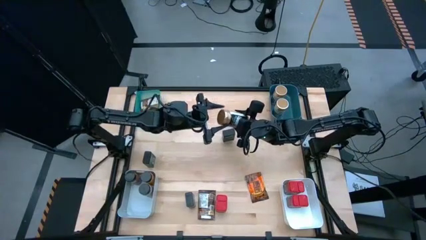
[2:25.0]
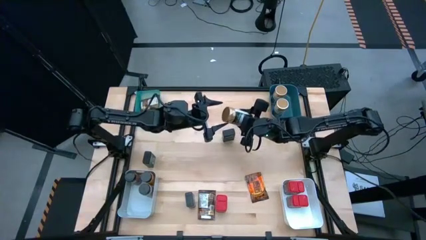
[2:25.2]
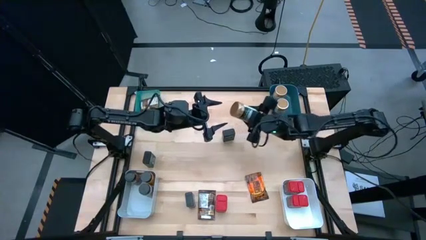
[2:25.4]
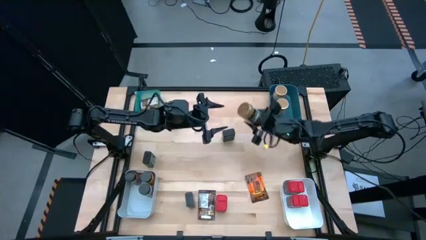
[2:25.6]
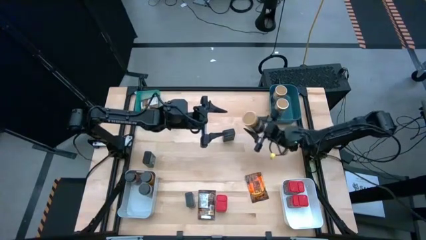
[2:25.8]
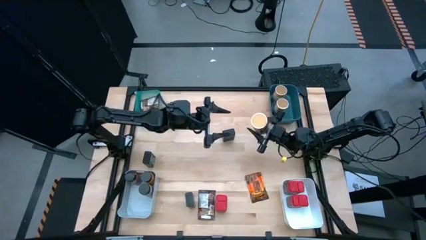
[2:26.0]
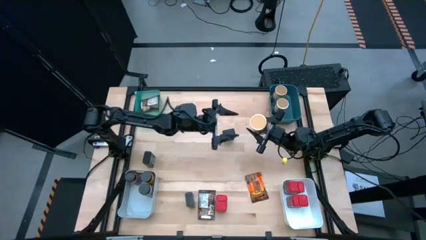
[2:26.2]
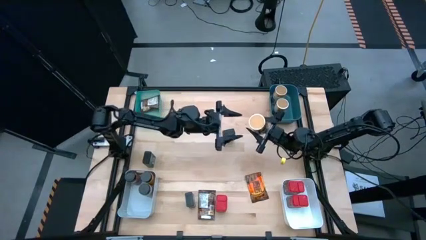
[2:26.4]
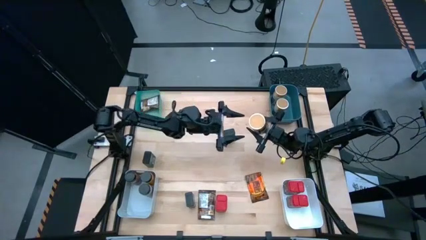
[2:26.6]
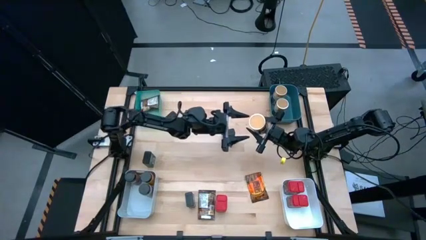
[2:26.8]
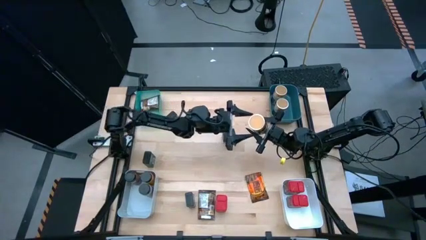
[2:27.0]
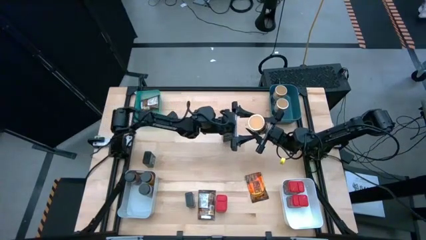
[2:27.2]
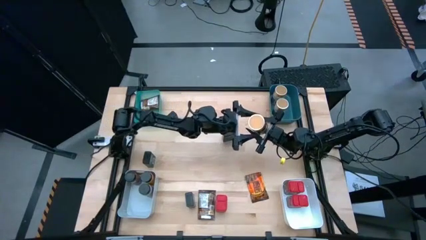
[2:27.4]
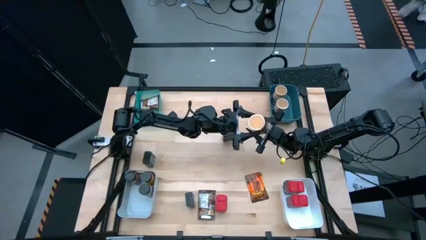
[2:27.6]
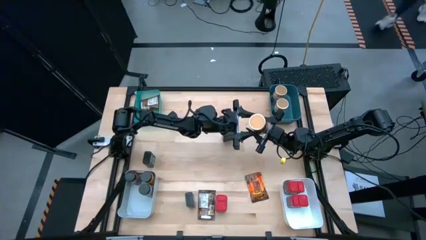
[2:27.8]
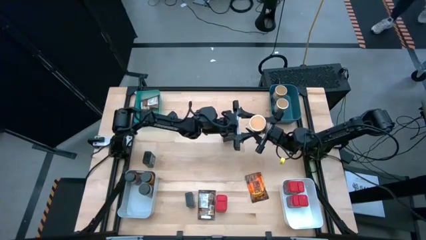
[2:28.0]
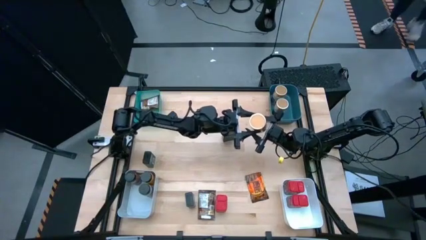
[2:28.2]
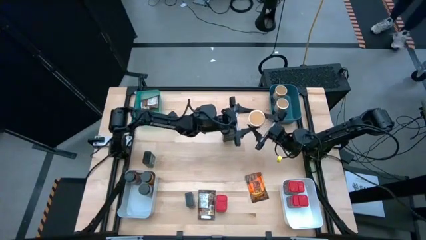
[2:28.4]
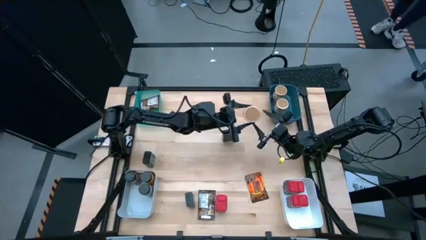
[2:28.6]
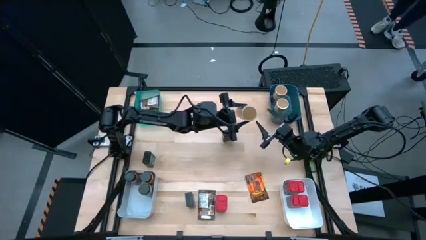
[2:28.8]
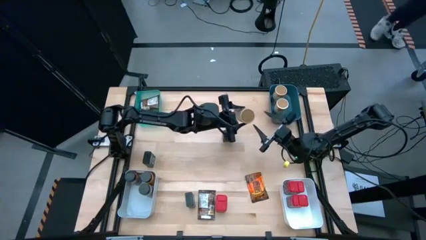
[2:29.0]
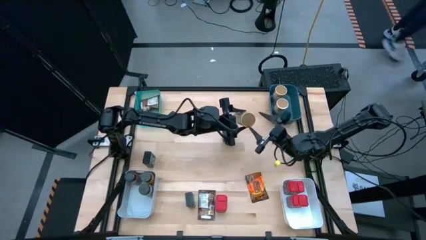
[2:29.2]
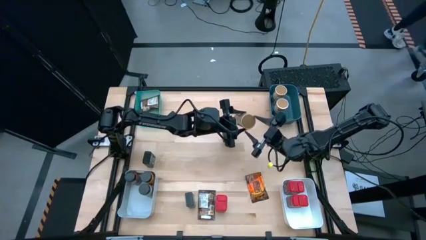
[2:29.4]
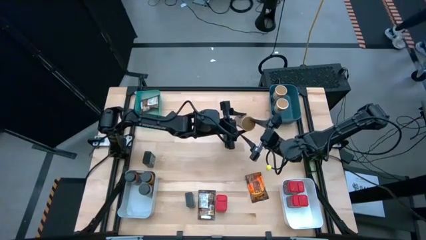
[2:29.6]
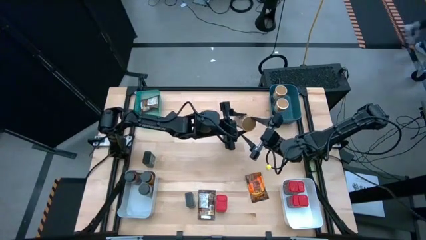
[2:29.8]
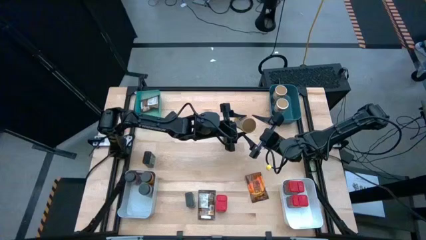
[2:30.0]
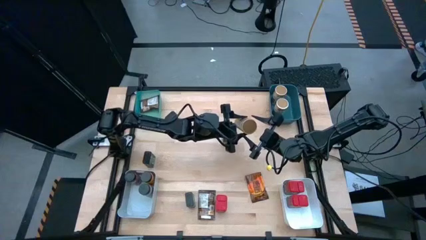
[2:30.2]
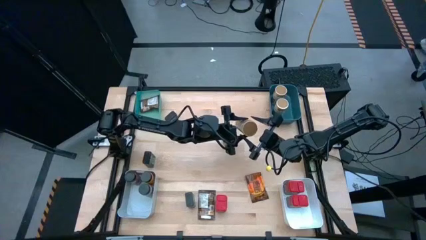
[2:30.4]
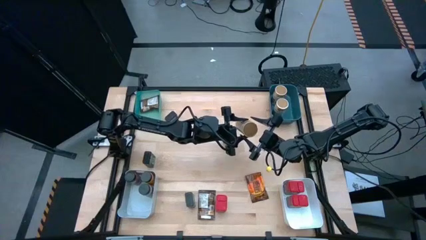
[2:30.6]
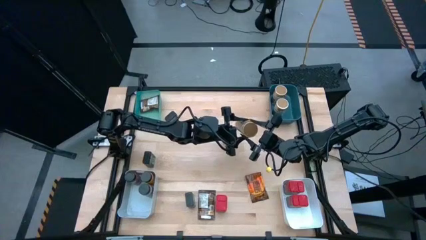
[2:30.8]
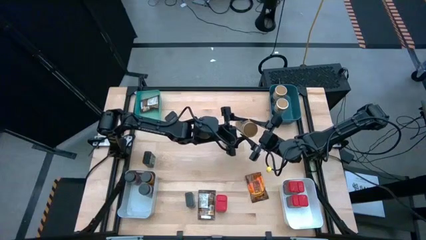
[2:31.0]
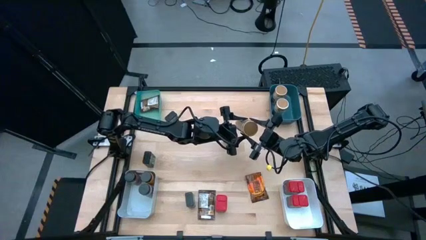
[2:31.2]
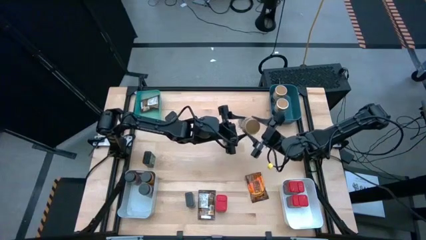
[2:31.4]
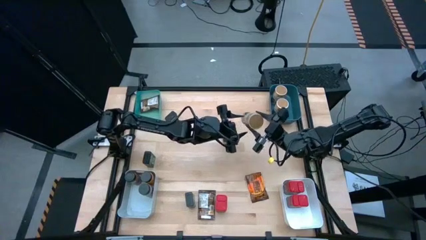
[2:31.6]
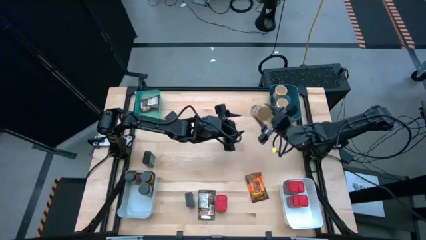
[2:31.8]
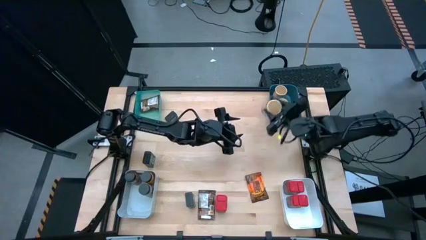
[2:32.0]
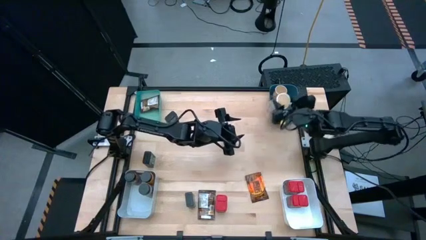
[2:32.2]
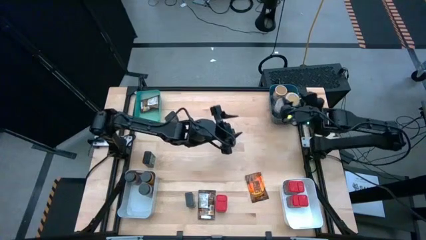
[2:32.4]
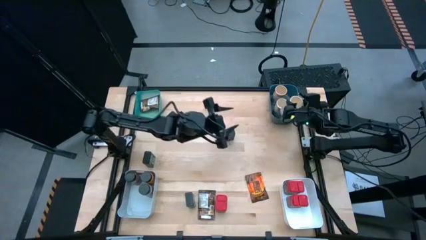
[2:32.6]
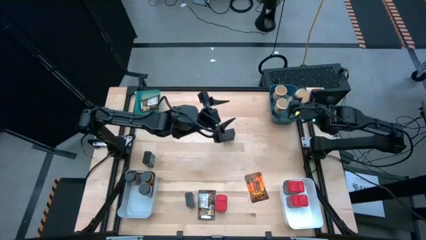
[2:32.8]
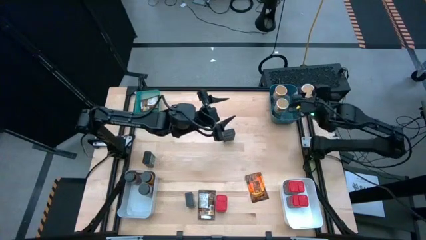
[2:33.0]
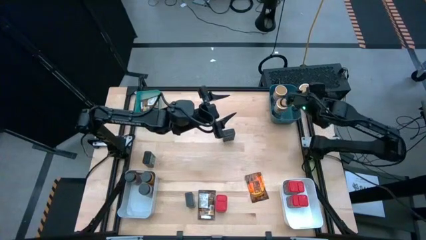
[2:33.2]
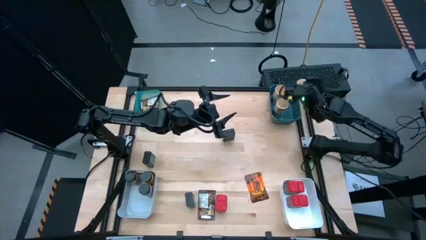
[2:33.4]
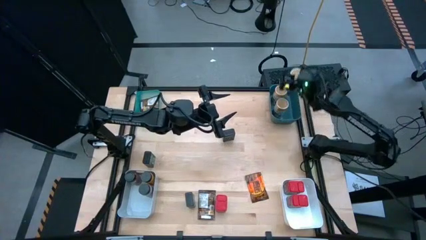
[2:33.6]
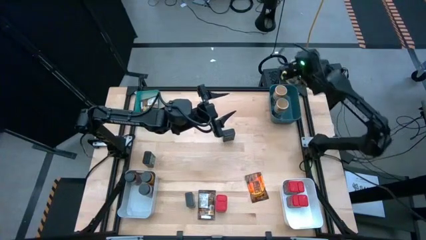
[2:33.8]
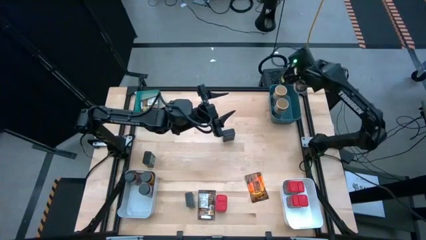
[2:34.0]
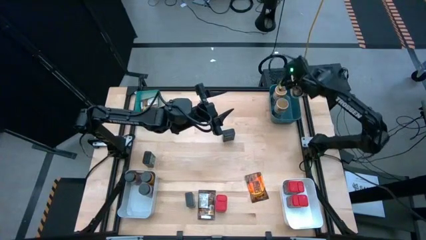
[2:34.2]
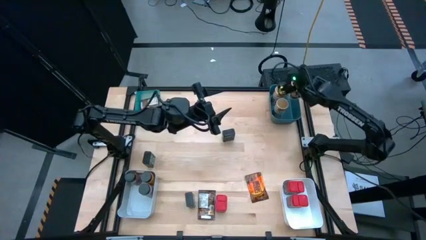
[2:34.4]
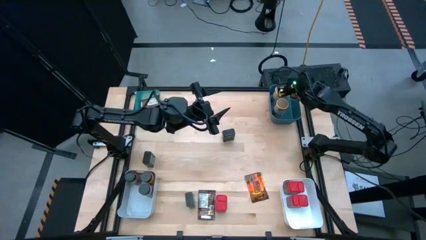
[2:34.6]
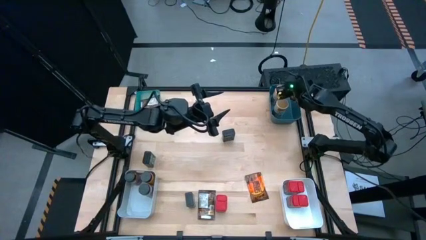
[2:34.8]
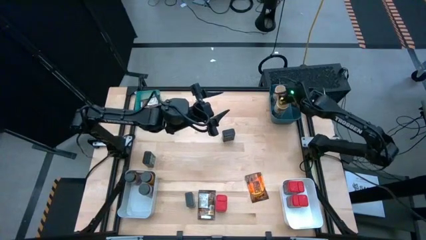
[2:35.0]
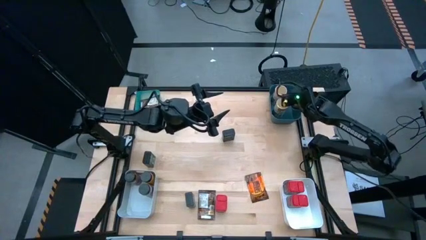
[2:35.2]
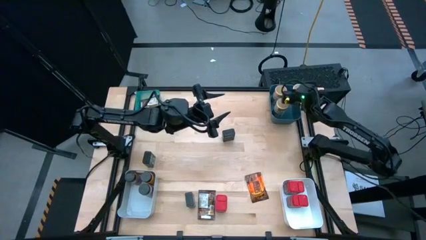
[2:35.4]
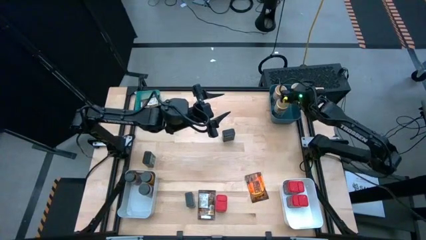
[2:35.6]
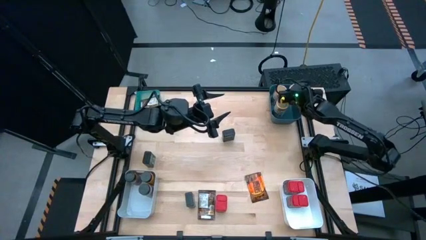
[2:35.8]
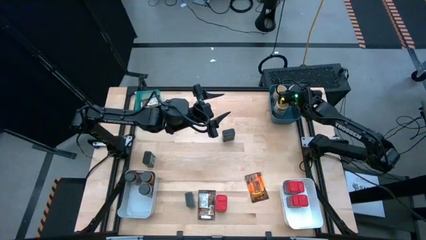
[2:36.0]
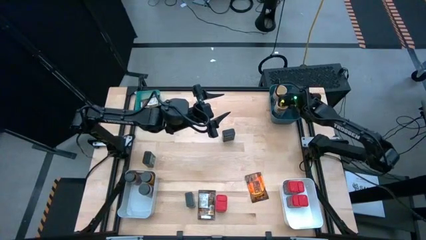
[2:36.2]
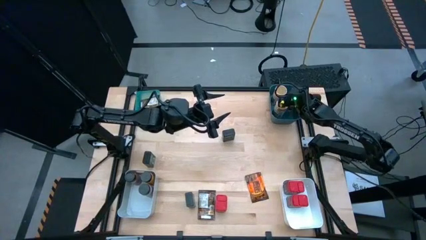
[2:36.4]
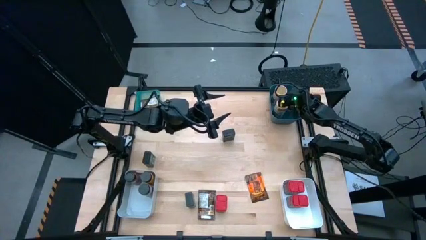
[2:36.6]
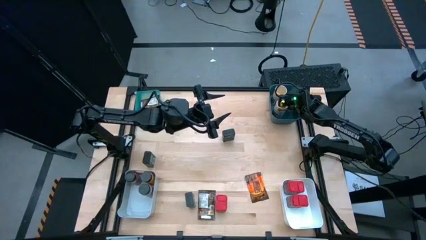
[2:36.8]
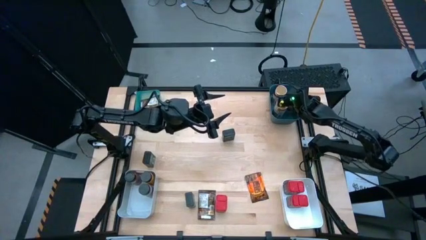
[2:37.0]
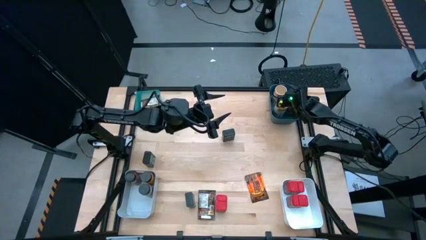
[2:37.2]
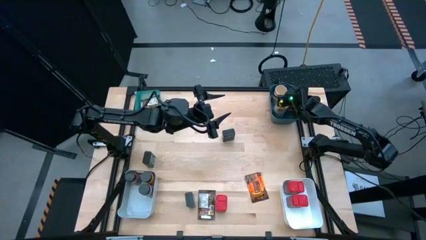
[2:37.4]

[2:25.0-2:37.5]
Task: Sort spices by type
Put the brown seasoning bottle into the dark green bin

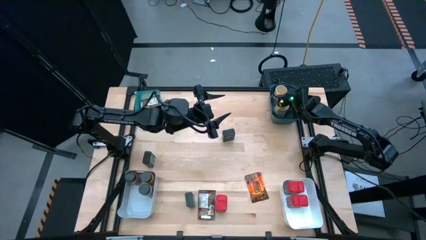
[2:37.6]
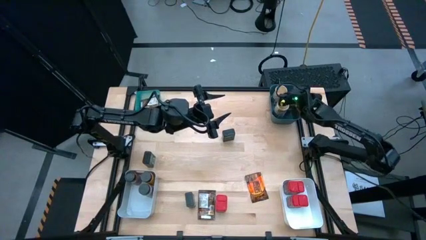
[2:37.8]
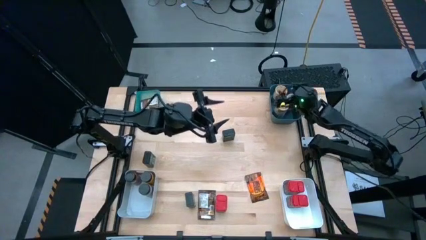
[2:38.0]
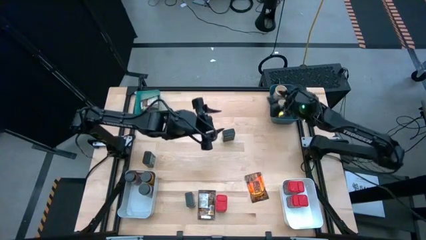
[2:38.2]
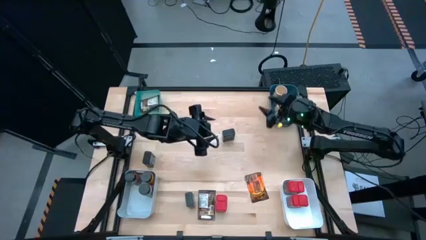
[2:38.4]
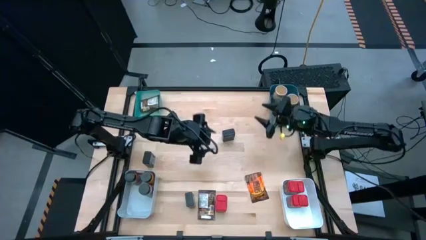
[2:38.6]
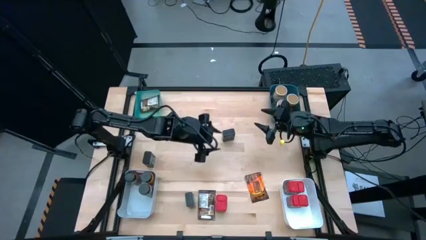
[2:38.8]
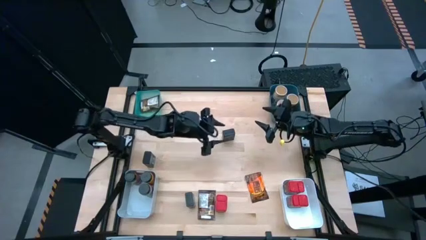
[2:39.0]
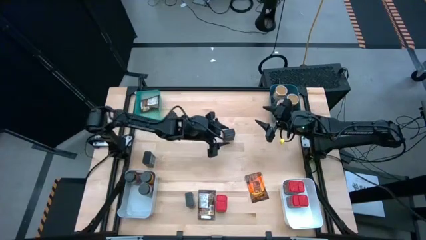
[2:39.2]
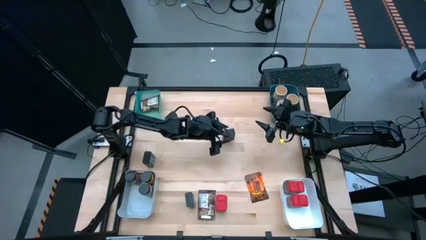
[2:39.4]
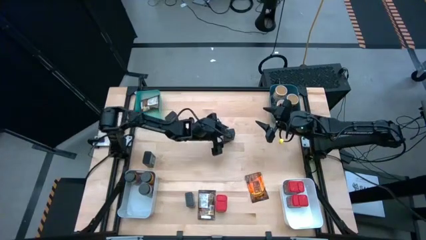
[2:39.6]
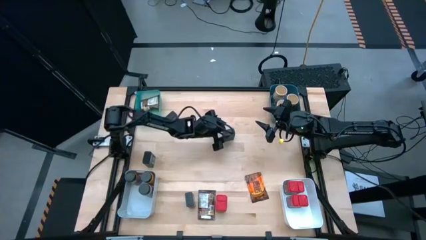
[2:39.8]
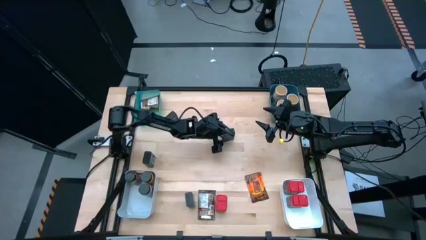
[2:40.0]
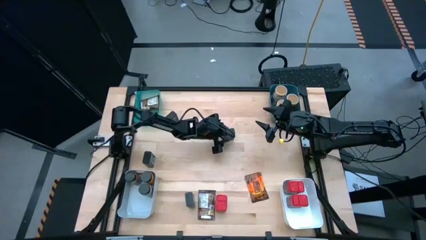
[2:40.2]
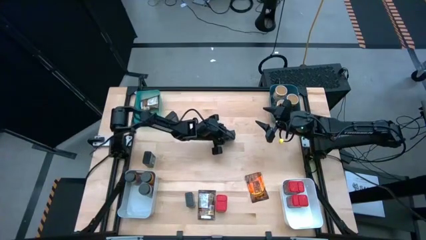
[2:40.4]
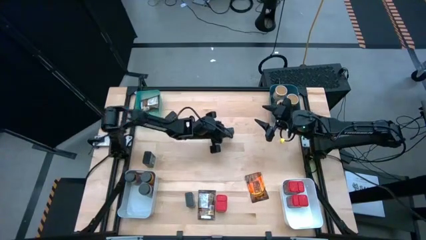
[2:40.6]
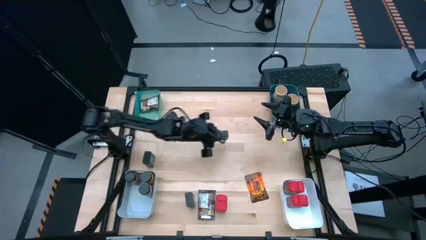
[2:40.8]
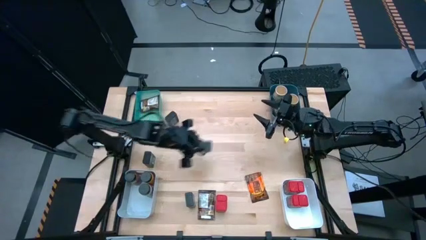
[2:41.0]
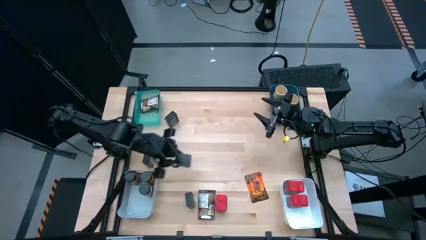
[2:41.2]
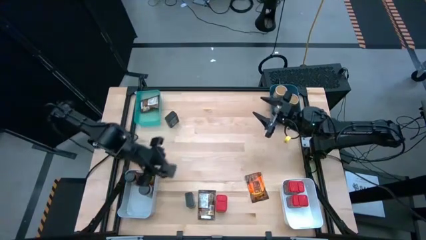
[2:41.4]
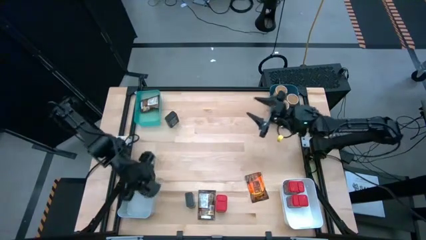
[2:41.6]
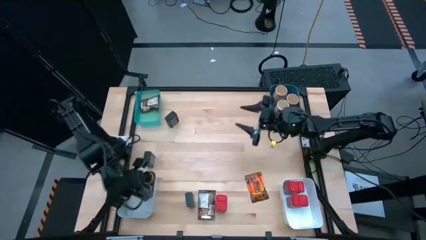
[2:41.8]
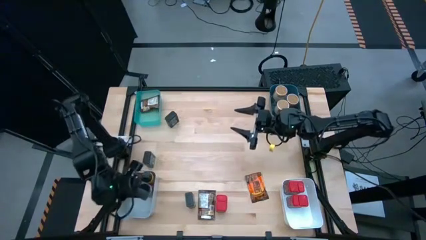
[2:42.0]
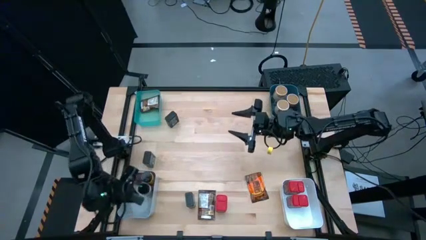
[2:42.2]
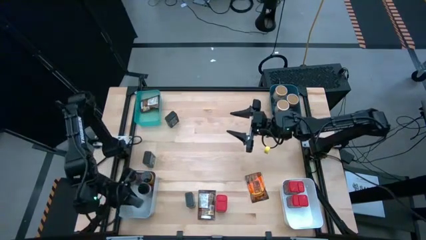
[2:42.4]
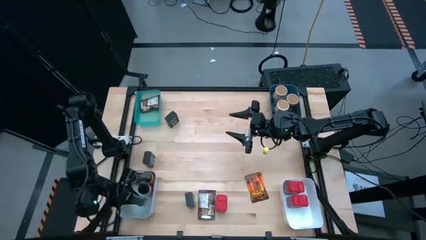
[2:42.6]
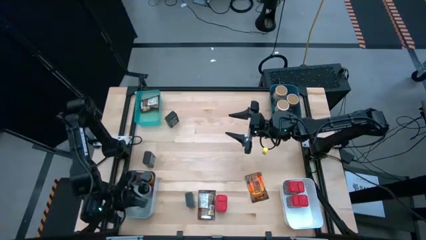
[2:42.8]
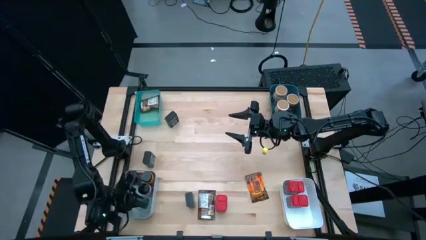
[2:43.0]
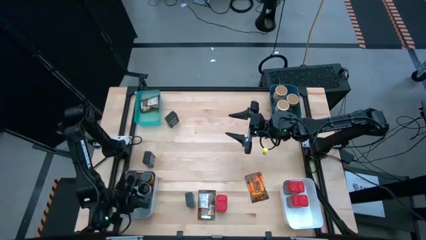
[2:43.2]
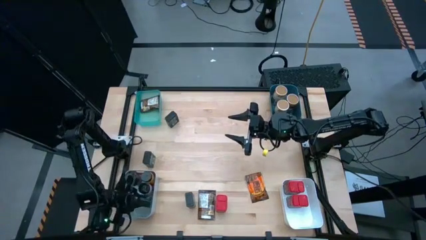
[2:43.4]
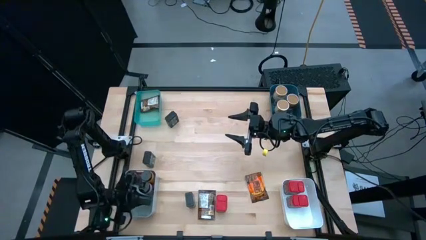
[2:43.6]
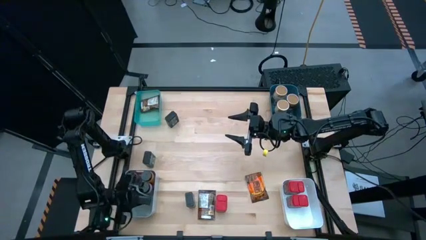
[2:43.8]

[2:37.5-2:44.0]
Put the top right black seasoning can into the gray bin
